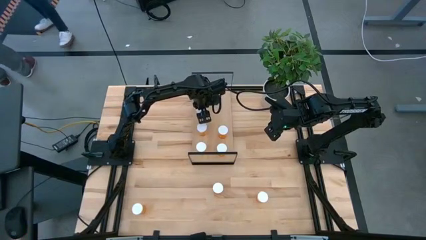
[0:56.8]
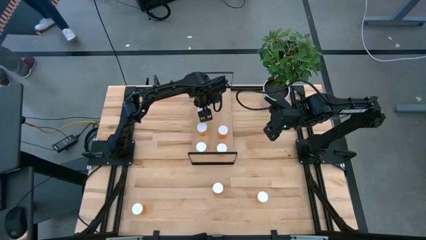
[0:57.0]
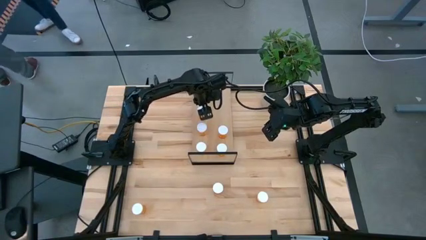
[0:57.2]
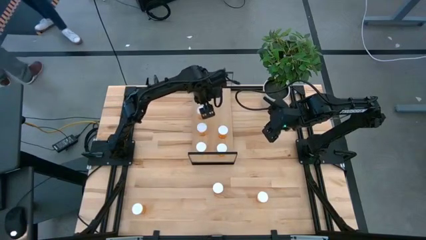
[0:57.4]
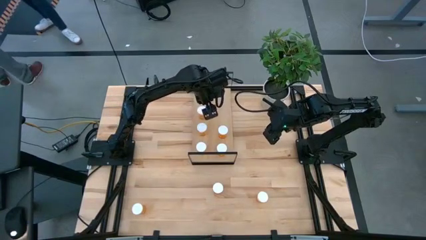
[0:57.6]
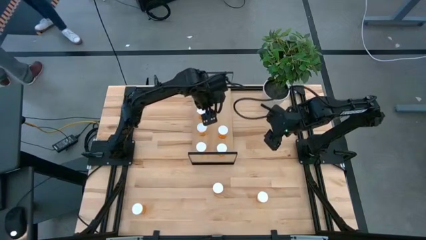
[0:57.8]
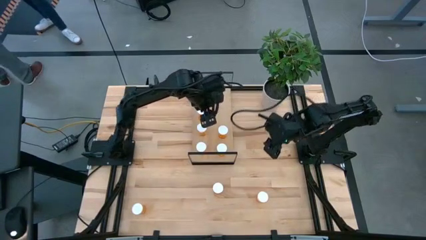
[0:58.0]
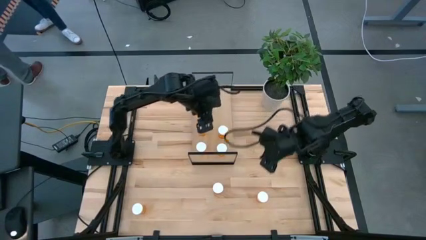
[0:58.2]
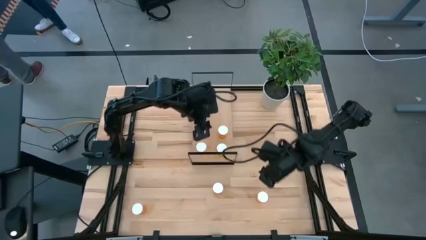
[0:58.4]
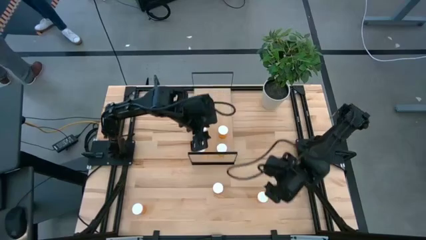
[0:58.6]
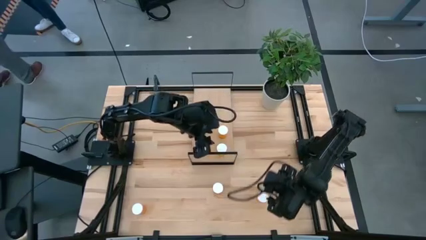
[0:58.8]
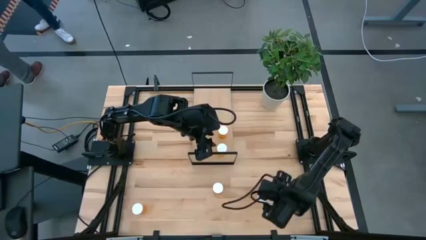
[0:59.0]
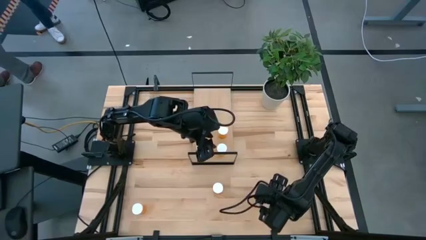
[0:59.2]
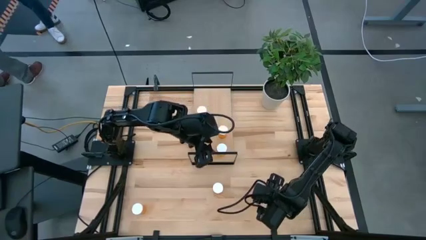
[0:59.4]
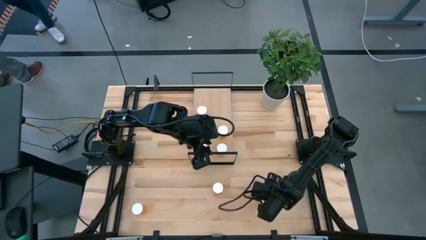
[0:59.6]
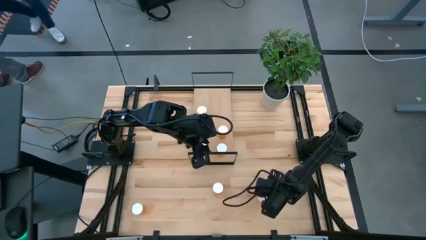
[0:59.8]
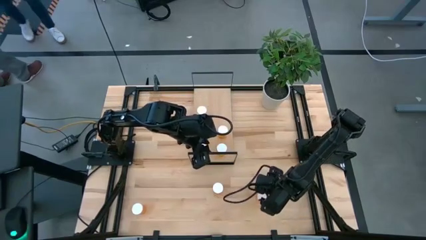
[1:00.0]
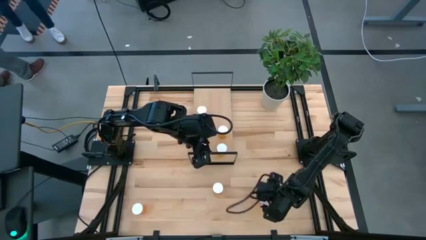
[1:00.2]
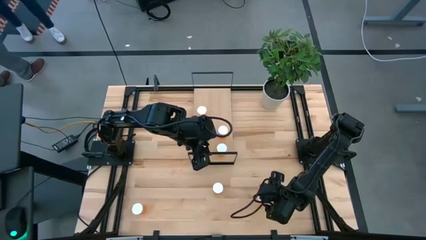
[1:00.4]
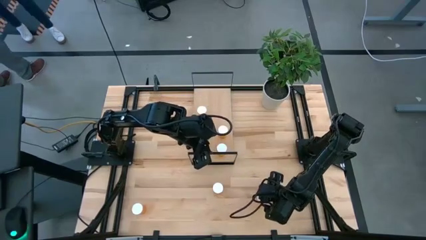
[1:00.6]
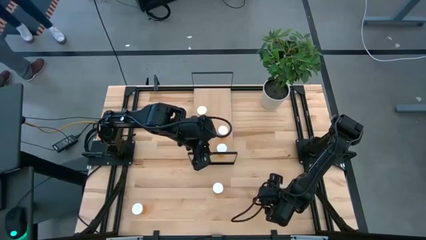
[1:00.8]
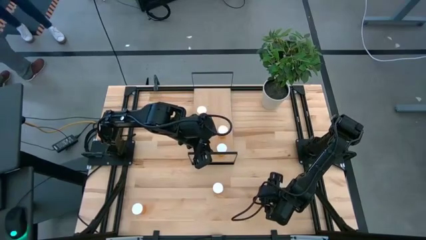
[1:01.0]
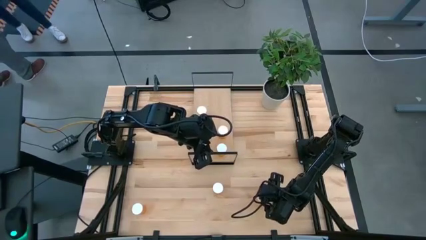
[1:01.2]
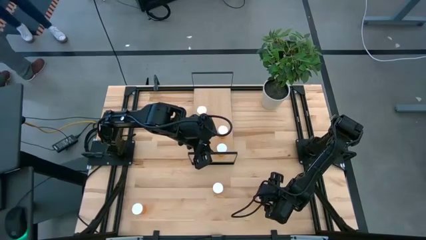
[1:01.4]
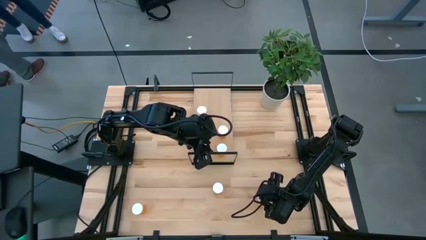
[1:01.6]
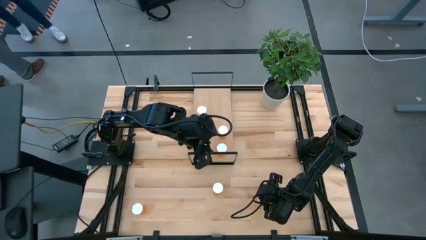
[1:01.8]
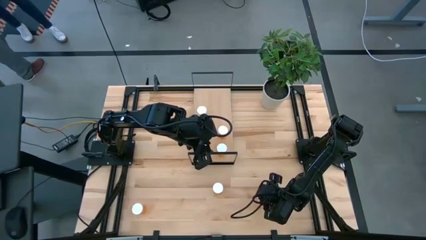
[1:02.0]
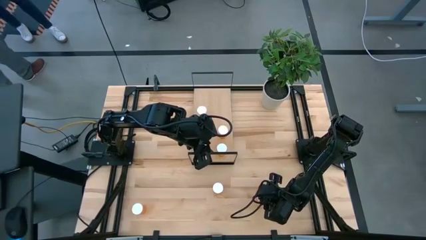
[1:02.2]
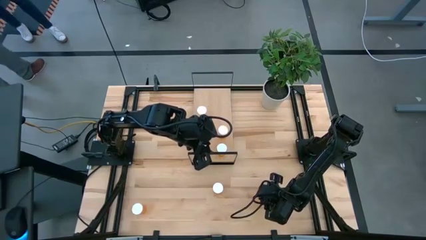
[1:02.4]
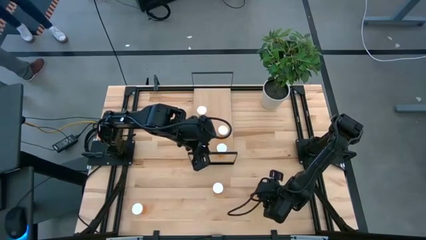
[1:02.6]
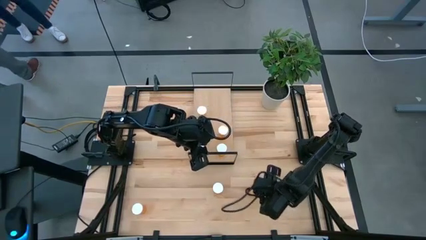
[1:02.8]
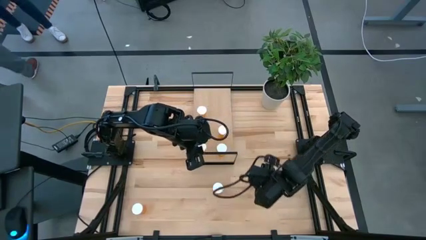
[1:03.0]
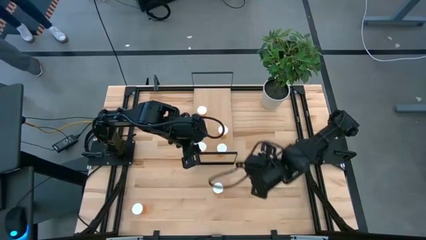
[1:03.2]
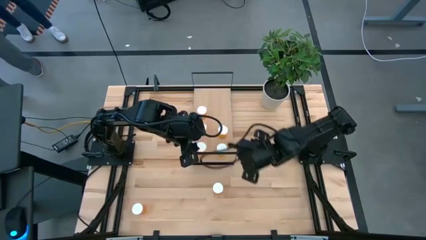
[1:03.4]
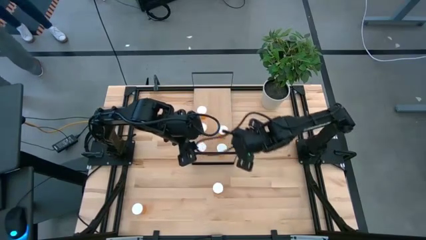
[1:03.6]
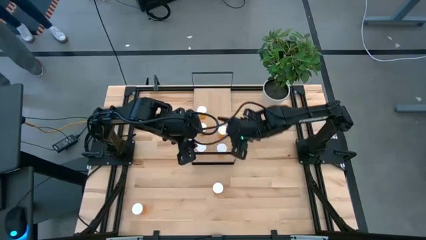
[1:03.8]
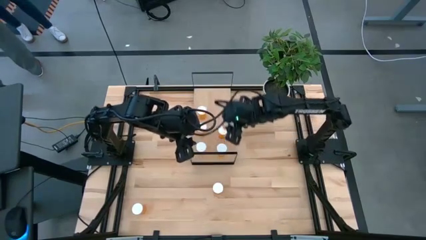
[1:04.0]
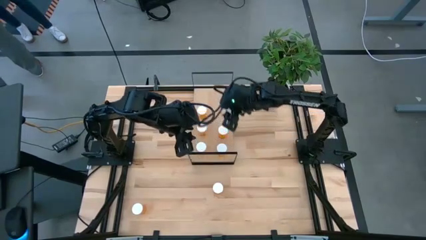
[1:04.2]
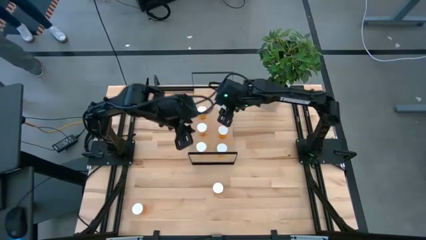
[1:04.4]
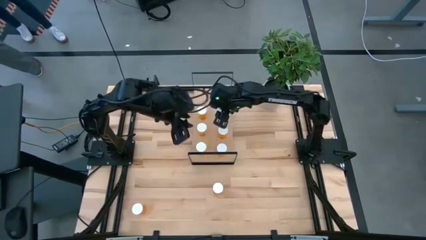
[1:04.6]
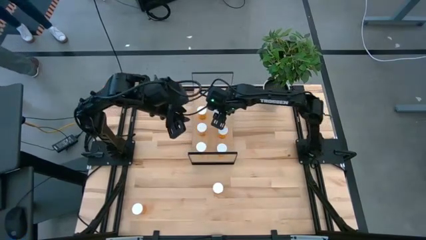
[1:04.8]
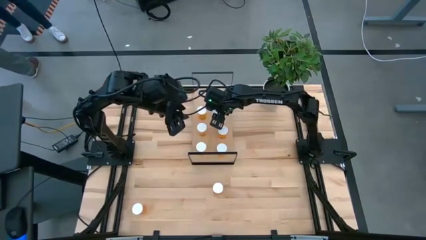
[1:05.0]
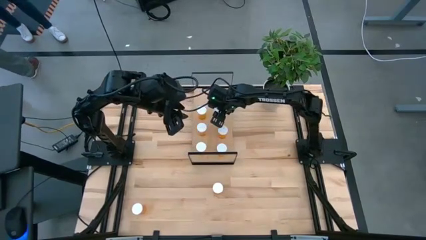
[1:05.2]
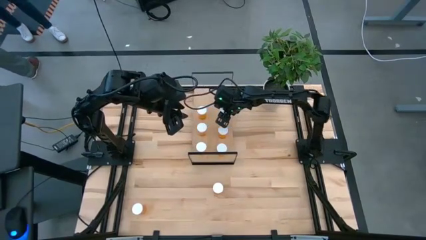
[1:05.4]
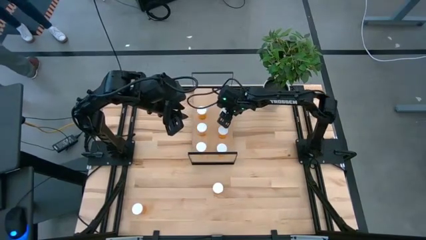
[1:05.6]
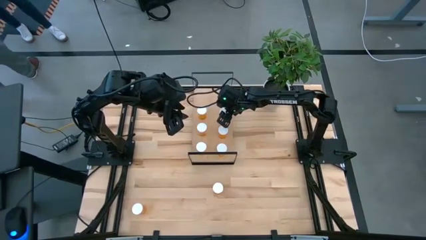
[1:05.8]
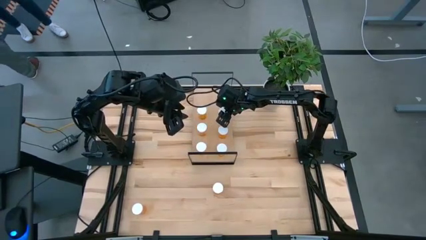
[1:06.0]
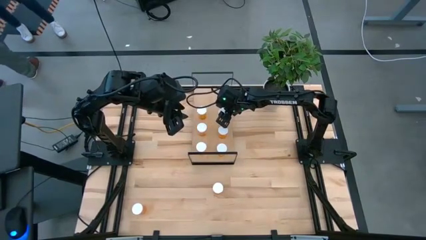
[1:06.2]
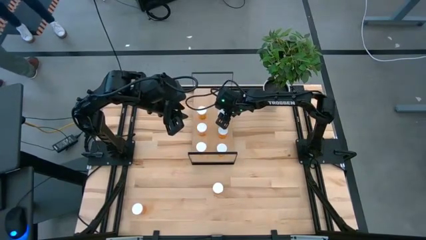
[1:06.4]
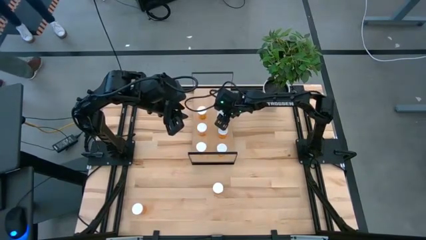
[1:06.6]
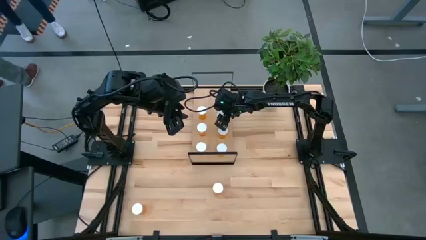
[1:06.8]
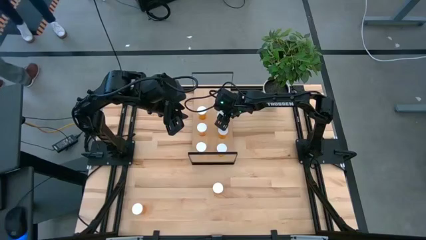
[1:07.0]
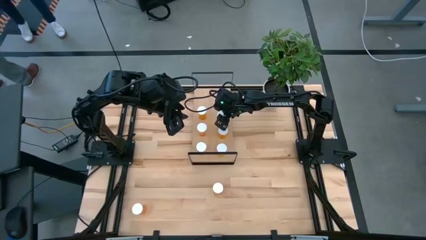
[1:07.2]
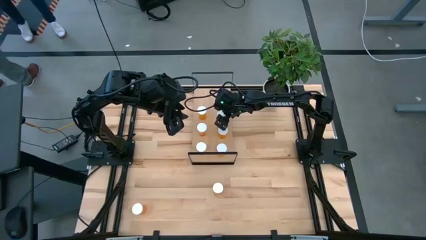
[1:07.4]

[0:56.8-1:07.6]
Task: Pick and place medicine bottles onto shelf by color
Put the orange pill bottle on the shelf aligned with the other orange pill bottles

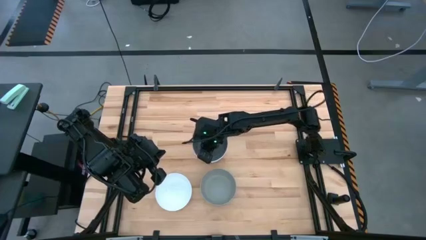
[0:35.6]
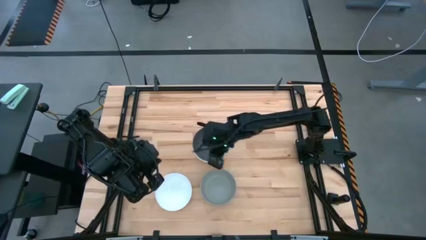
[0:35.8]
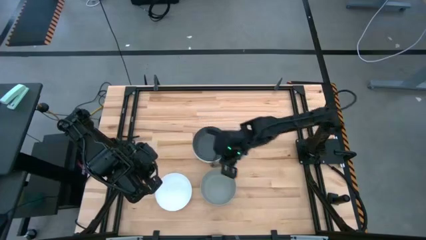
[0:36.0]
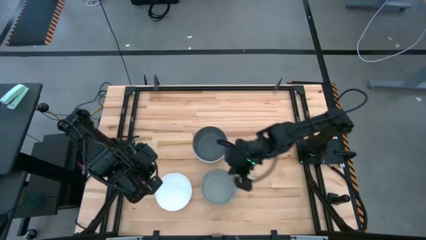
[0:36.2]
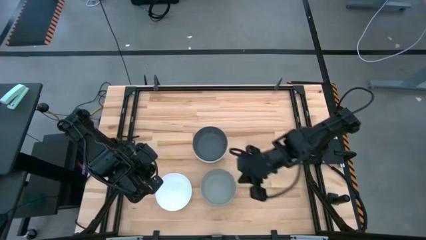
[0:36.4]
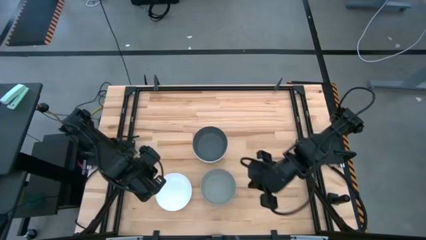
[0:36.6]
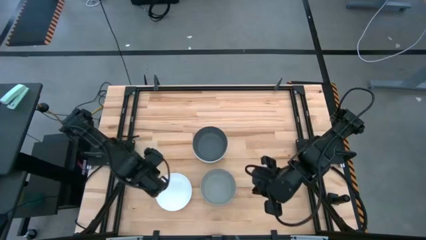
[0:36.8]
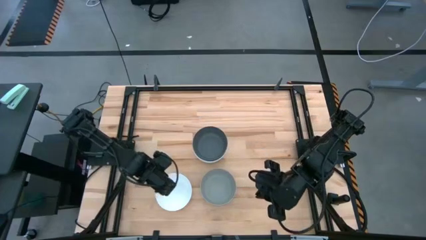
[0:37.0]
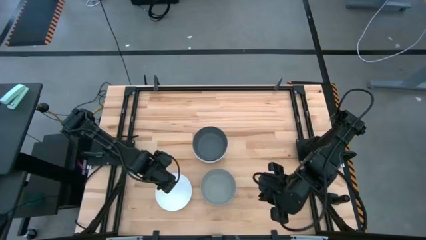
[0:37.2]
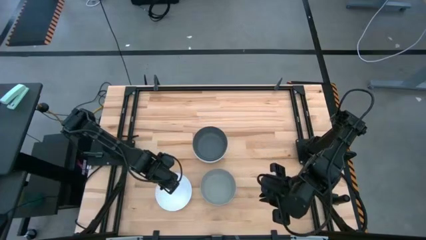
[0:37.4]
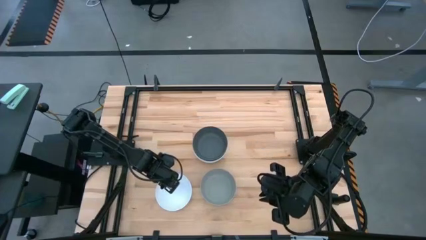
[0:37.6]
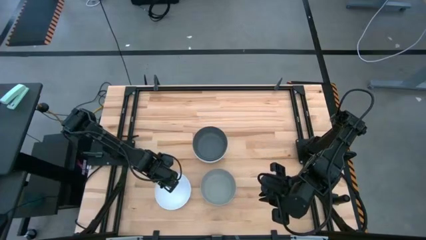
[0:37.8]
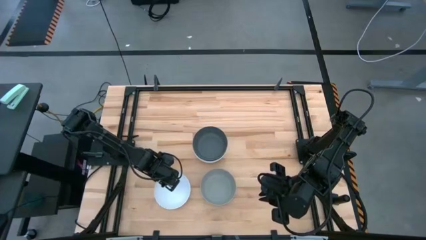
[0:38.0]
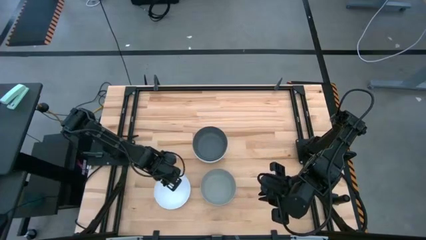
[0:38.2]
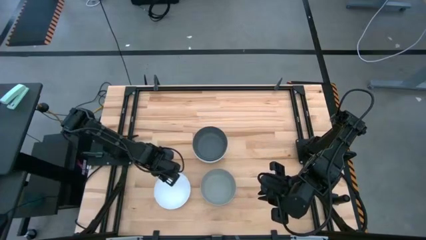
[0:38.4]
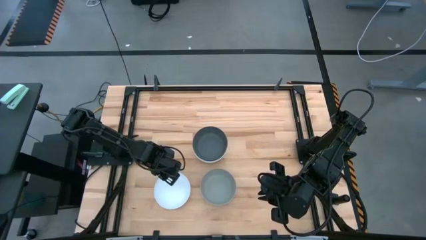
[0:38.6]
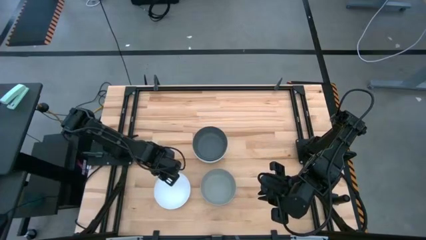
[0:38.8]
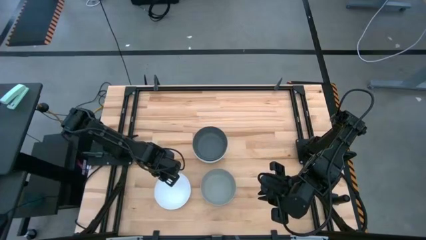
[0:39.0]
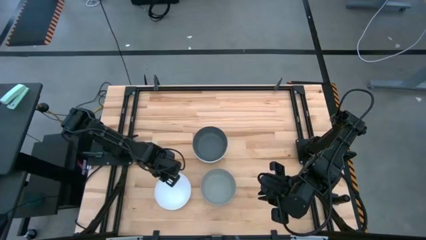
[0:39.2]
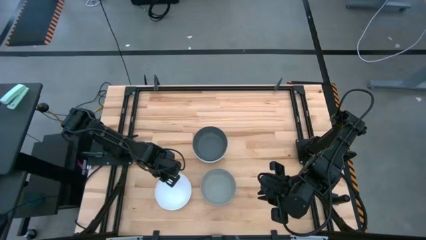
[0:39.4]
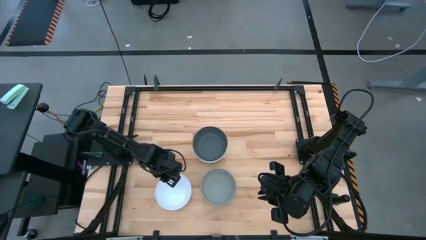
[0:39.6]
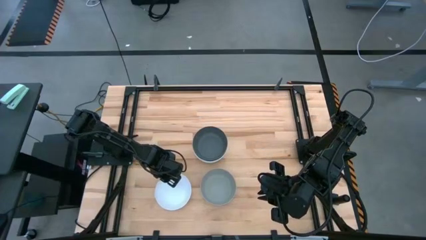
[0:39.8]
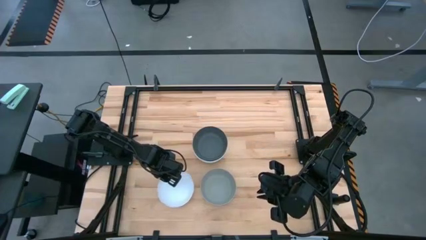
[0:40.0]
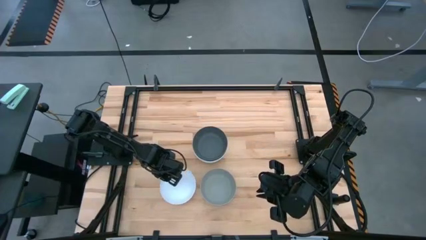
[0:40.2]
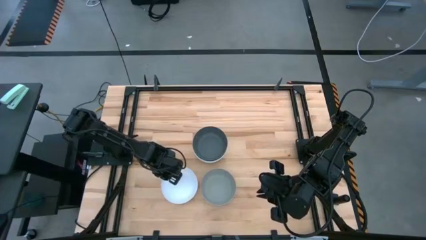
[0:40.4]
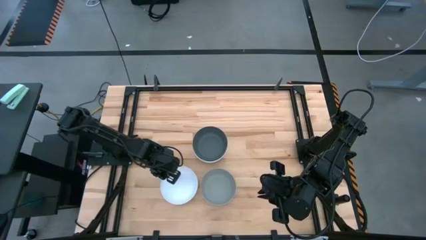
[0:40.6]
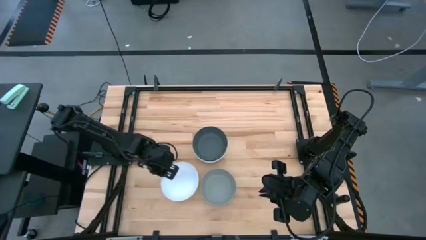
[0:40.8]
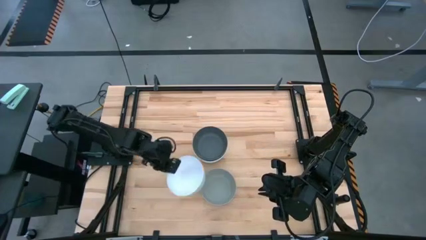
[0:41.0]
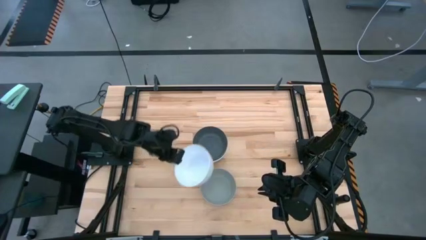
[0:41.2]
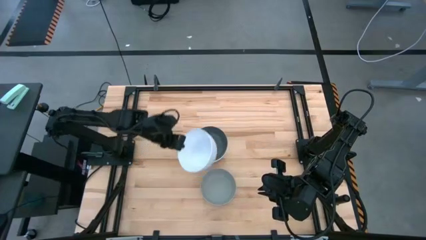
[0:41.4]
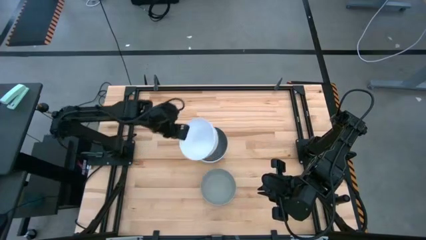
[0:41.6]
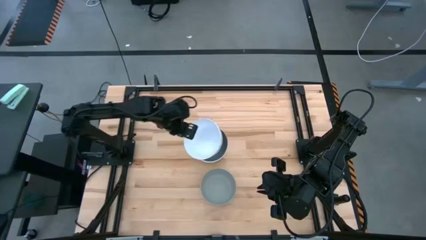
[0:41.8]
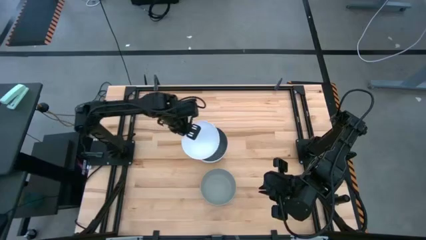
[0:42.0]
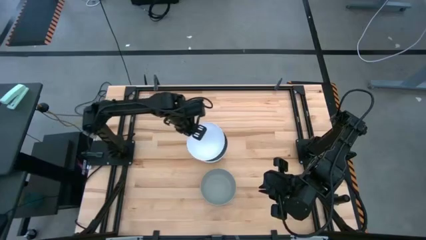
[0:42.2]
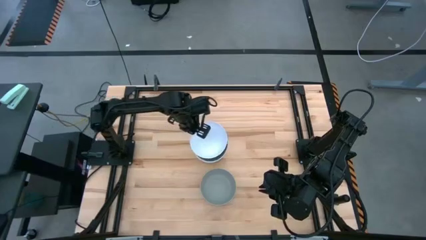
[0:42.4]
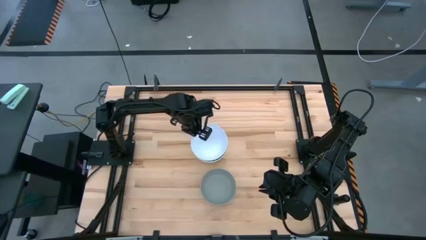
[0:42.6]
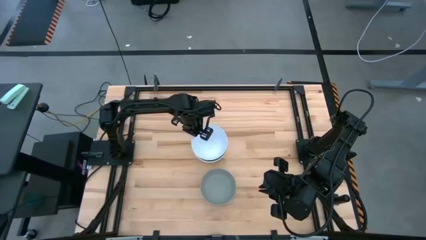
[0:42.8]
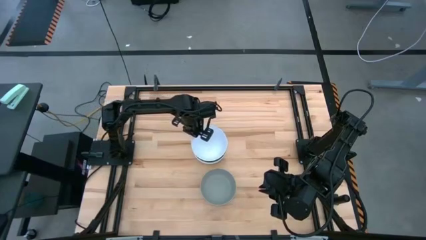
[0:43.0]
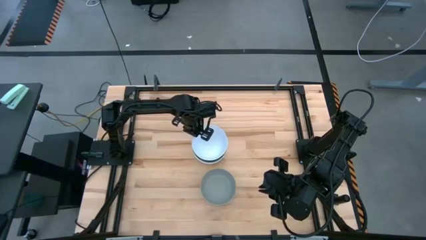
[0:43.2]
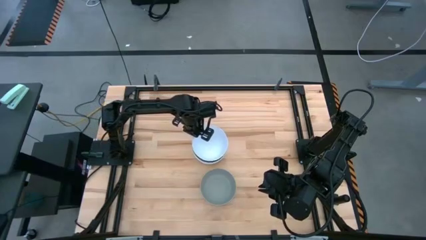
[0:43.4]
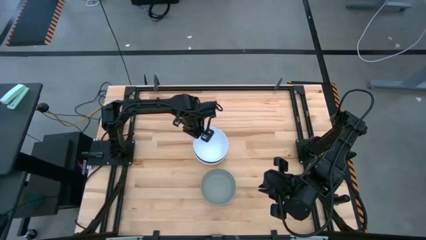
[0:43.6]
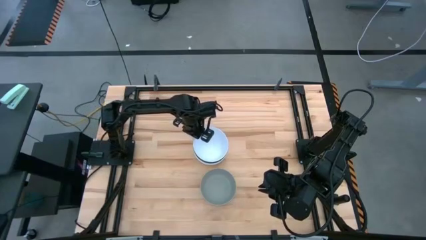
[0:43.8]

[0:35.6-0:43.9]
Task: Nest bowls inside each other
Stack the white bowl on top of the gray bowl
